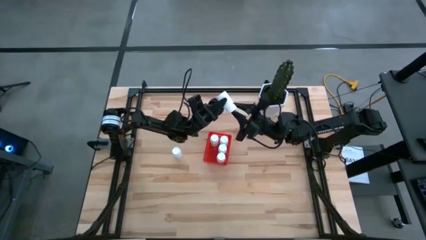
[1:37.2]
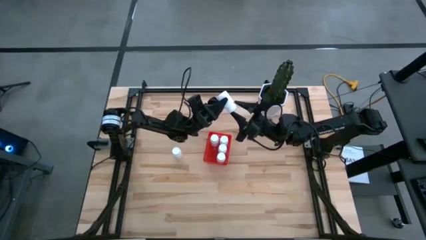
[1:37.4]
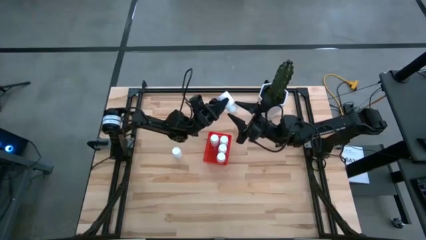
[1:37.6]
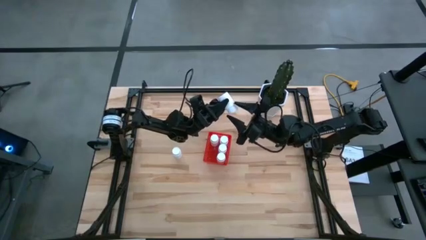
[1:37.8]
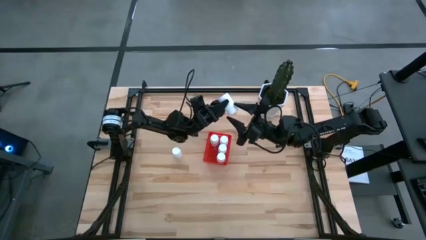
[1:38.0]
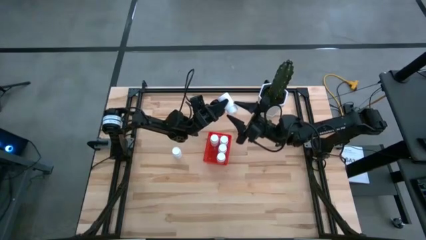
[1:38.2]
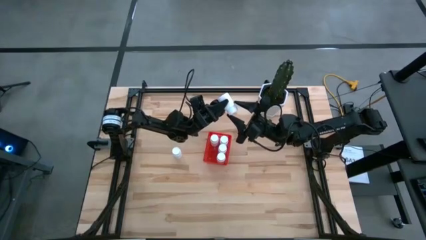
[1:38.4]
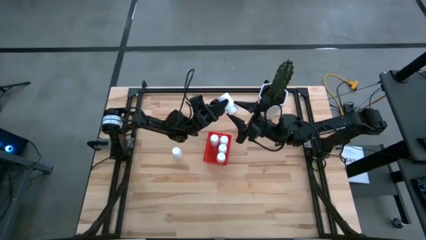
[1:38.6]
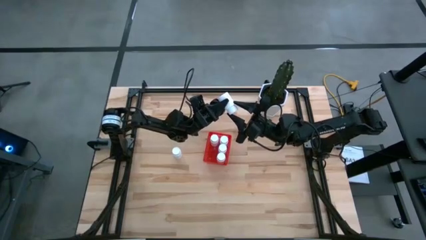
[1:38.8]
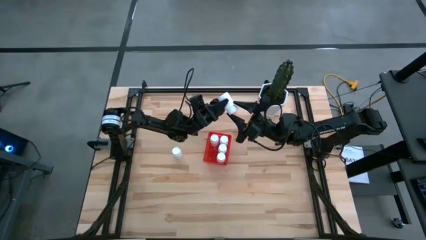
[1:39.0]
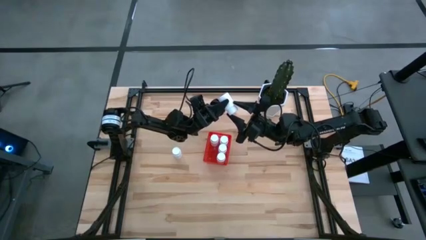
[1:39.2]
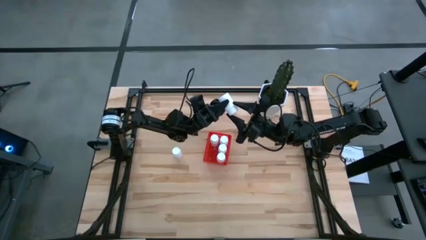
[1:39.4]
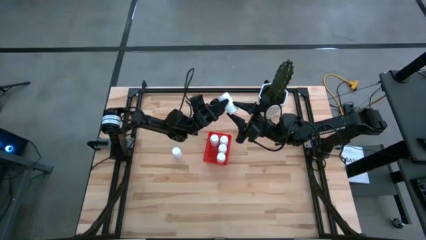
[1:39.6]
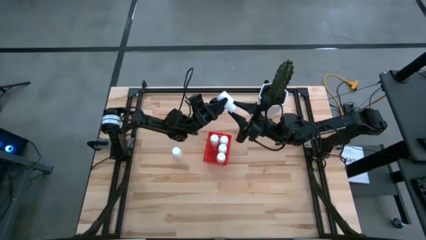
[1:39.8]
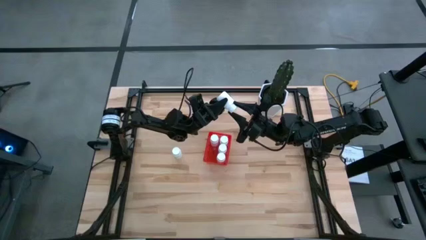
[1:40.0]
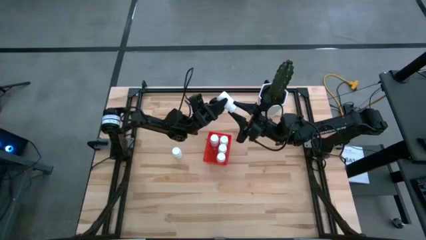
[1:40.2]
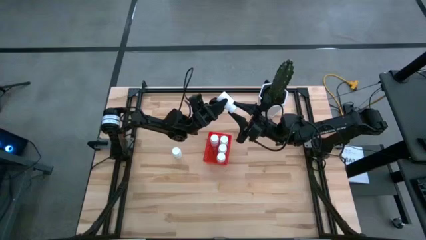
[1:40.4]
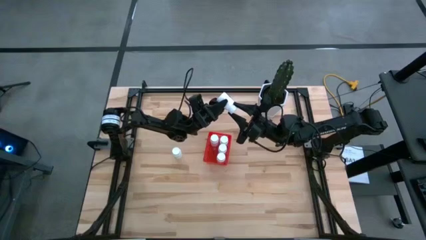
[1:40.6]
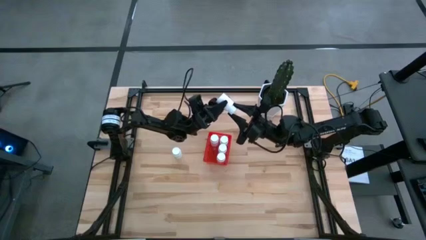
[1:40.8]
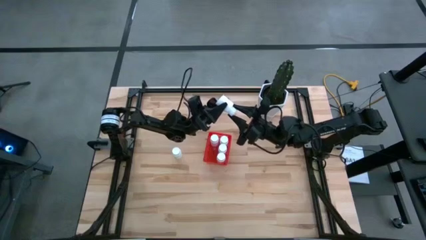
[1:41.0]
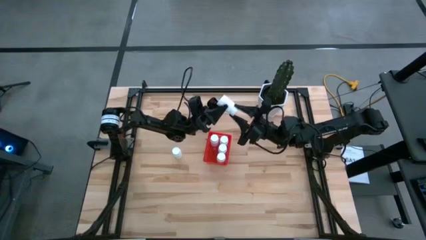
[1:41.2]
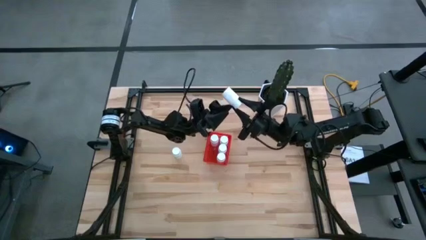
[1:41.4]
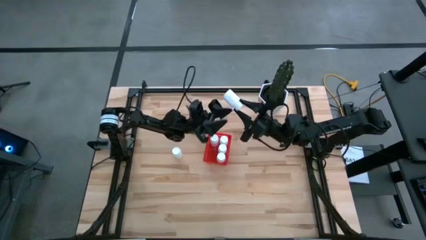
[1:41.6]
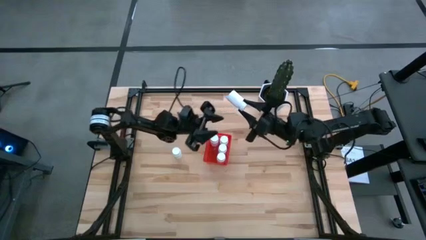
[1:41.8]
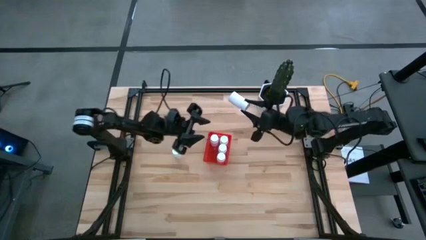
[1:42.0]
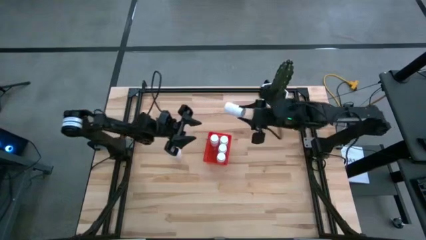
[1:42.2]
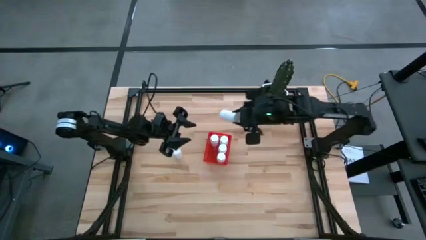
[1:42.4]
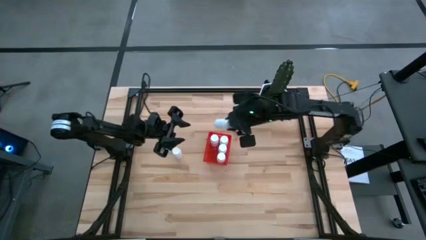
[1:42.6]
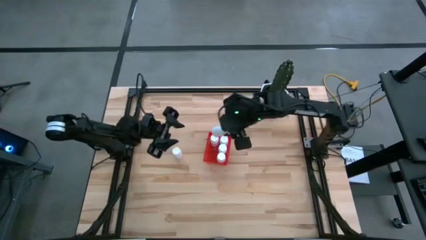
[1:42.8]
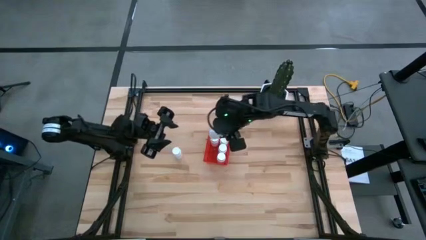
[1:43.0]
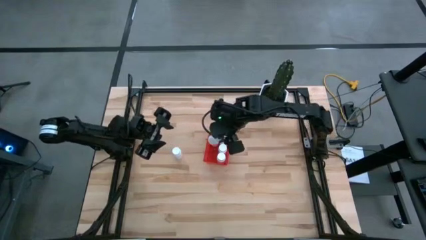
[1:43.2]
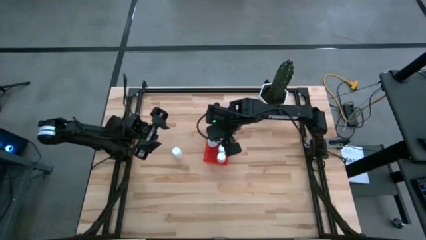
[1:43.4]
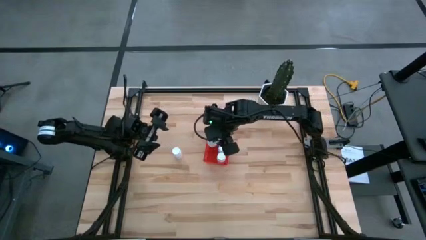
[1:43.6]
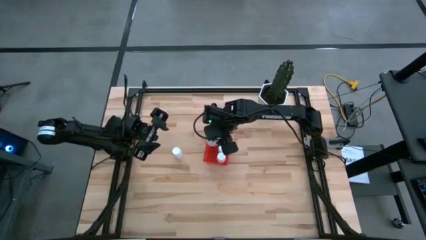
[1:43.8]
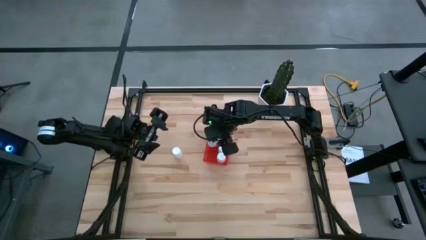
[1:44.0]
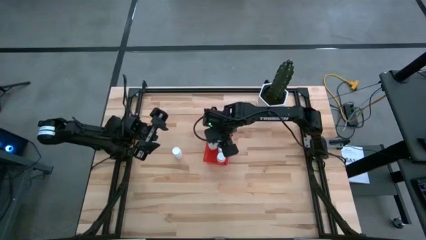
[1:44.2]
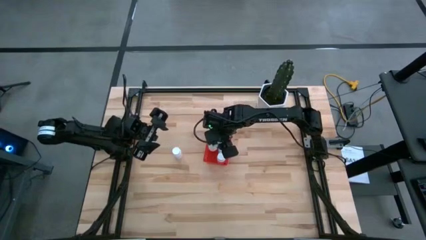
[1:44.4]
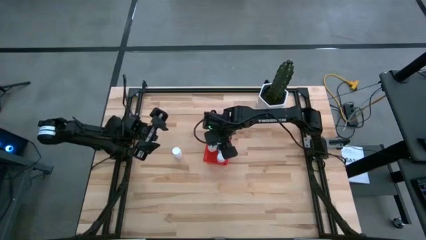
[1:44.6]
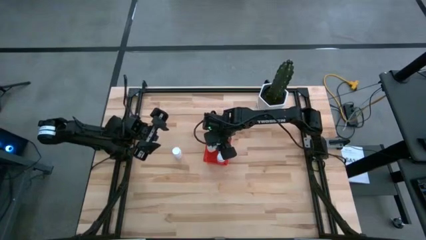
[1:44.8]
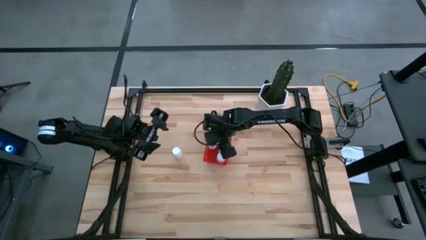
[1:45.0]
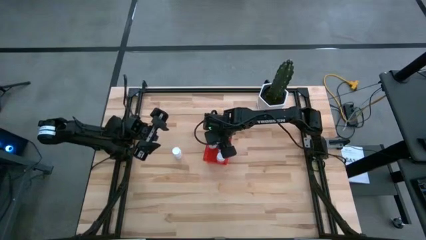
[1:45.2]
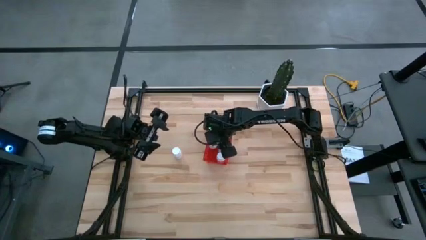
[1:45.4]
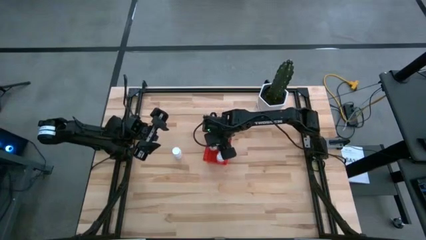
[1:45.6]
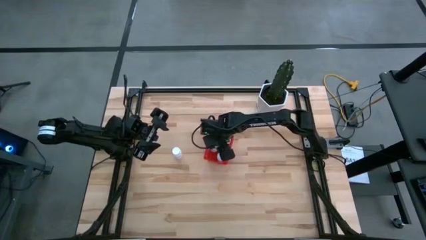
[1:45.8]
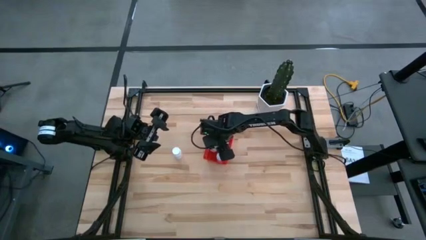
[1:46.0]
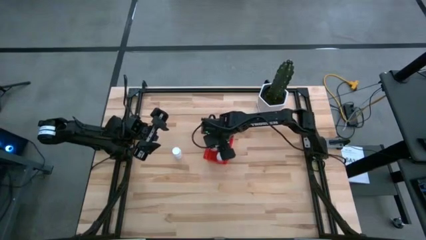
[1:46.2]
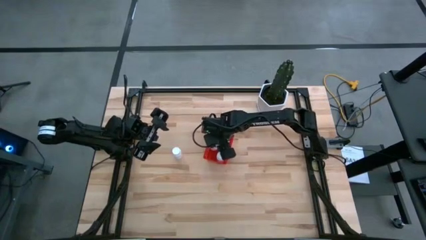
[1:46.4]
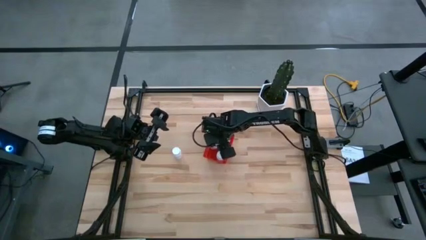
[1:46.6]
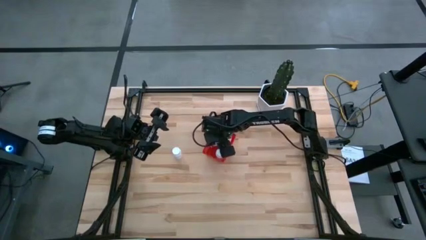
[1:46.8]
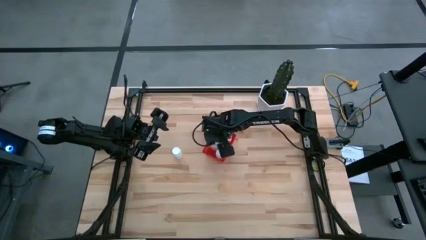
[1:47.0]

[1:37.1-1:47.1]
Task: Pick and place pill bottles into a basket
Put the left white pill bottle into the red bin
